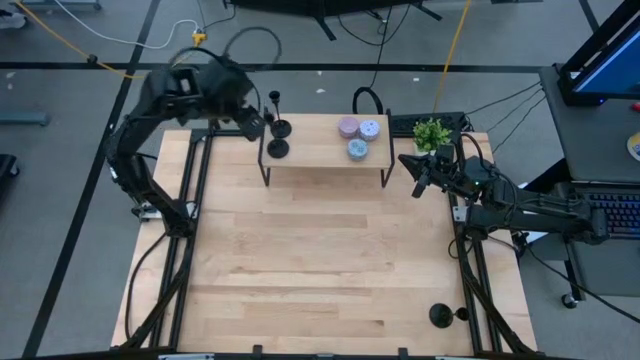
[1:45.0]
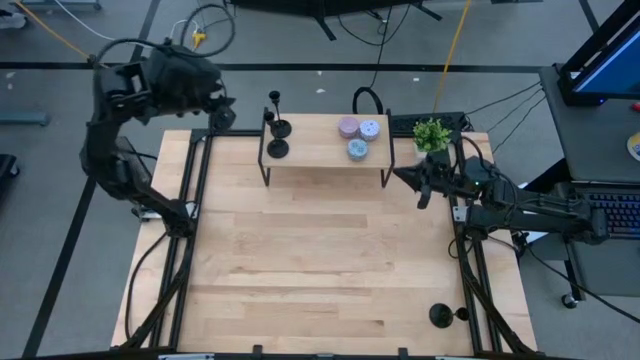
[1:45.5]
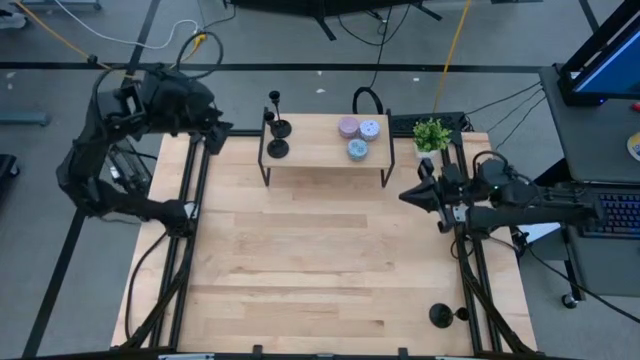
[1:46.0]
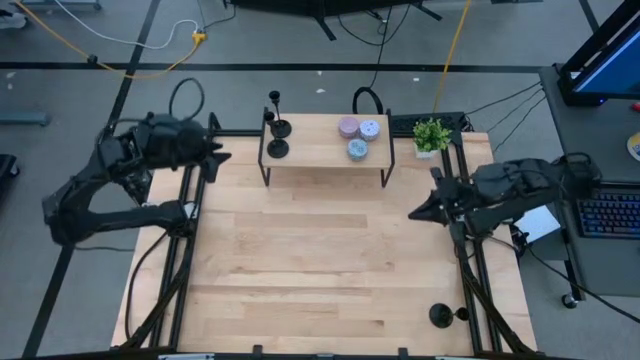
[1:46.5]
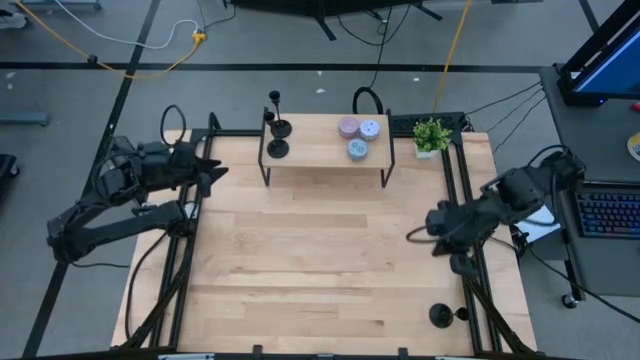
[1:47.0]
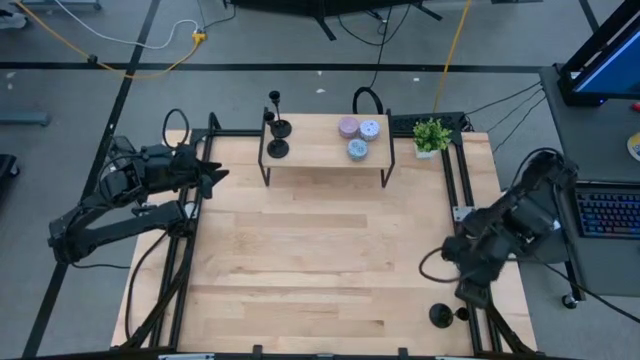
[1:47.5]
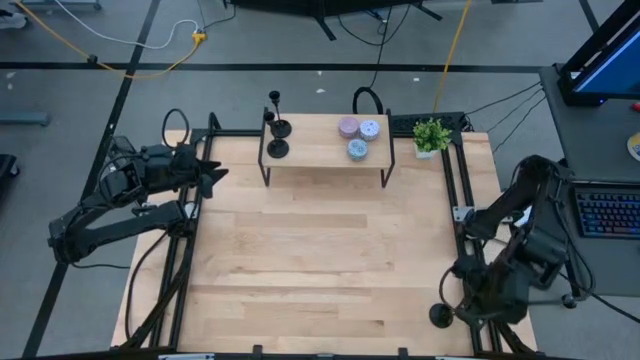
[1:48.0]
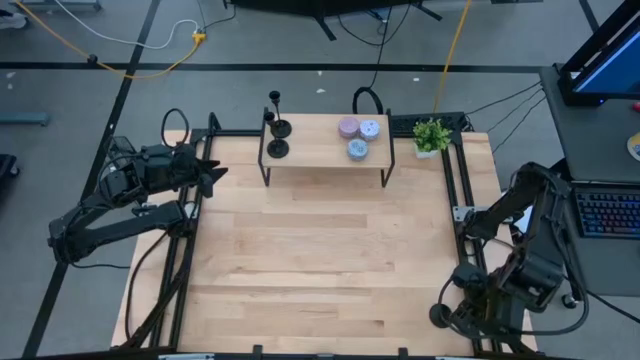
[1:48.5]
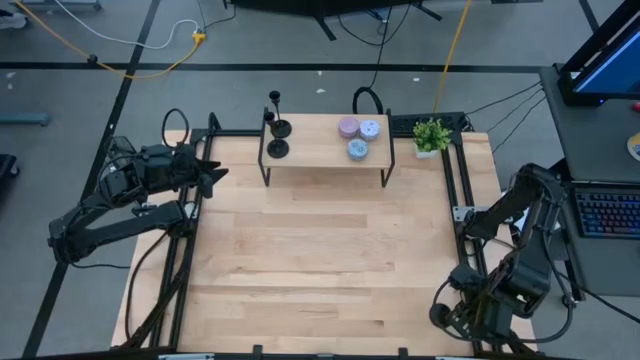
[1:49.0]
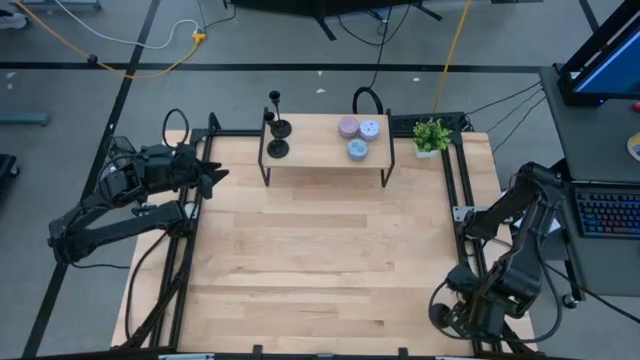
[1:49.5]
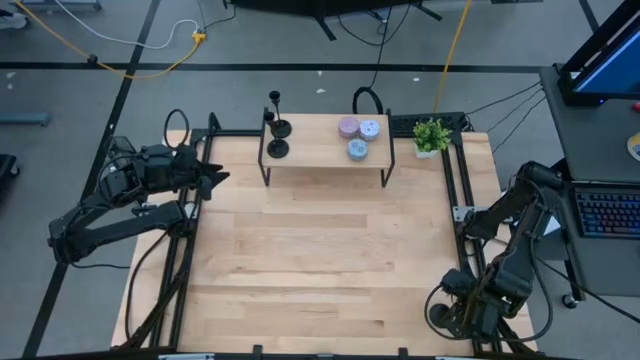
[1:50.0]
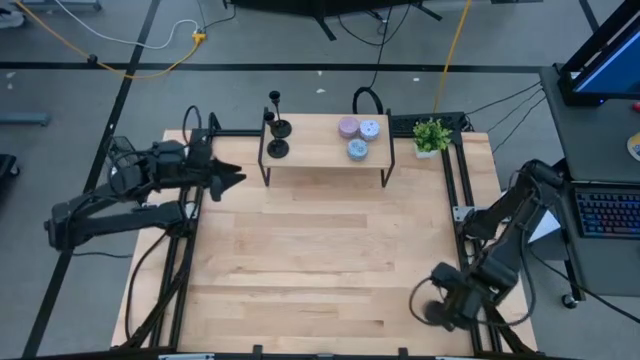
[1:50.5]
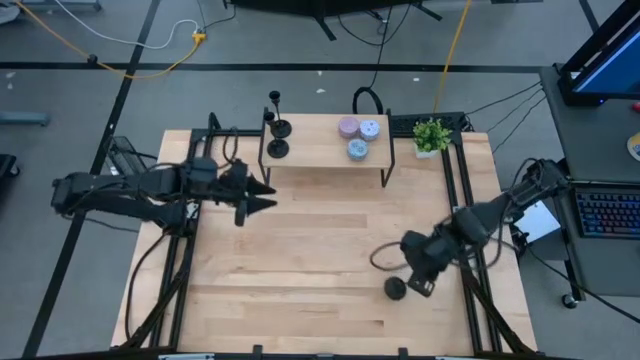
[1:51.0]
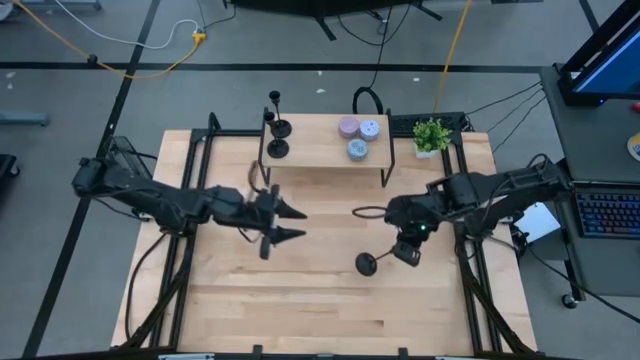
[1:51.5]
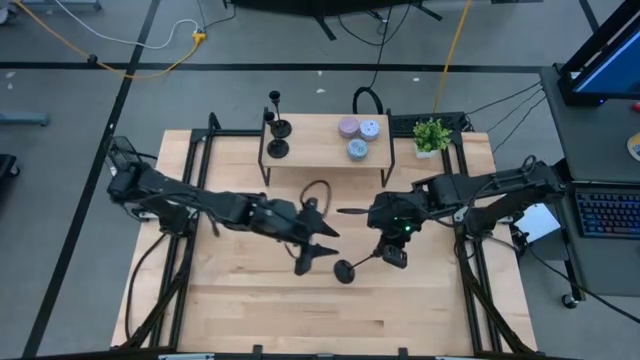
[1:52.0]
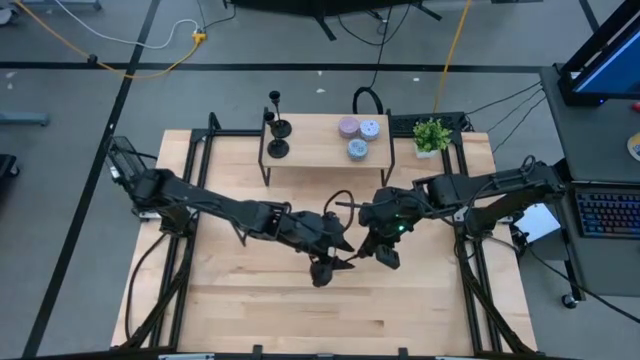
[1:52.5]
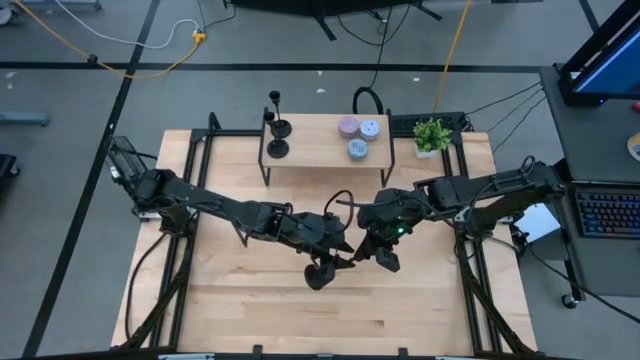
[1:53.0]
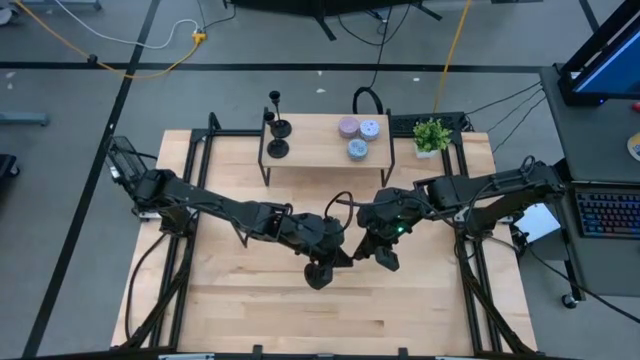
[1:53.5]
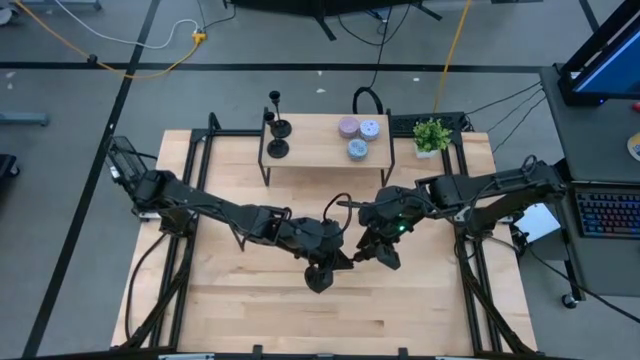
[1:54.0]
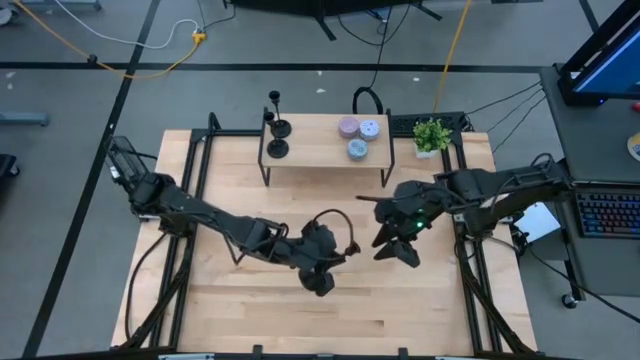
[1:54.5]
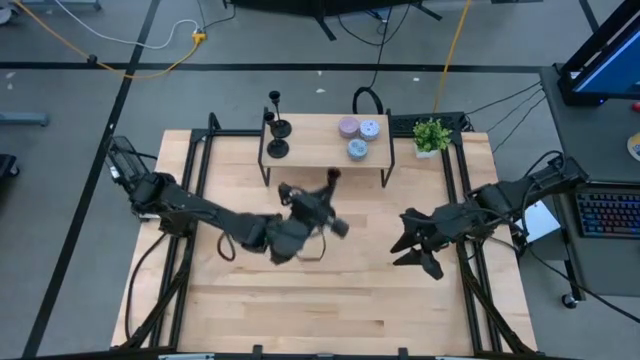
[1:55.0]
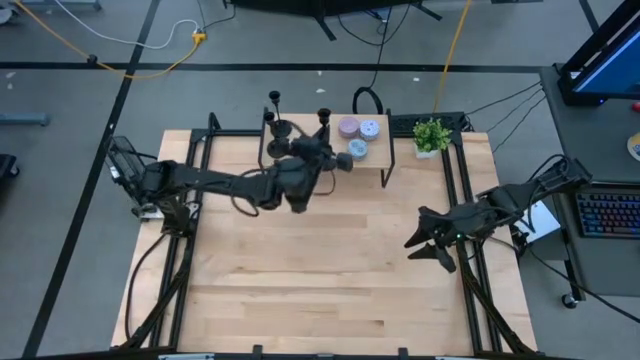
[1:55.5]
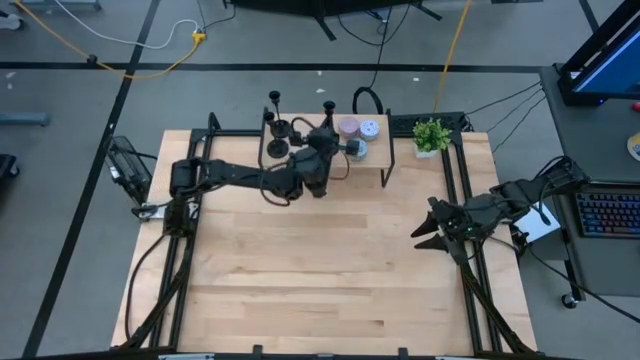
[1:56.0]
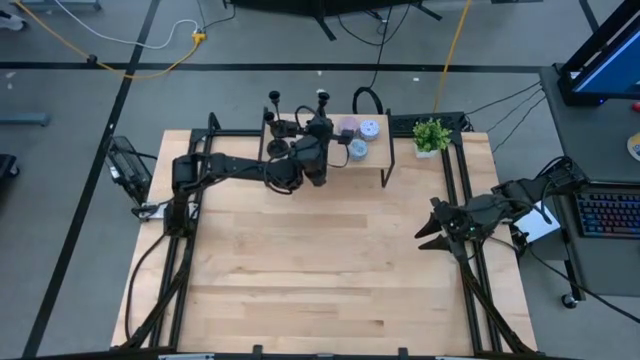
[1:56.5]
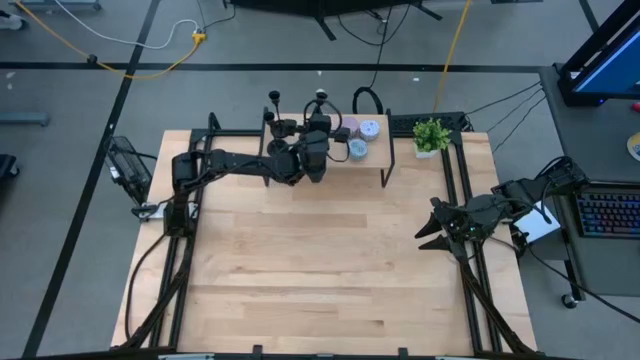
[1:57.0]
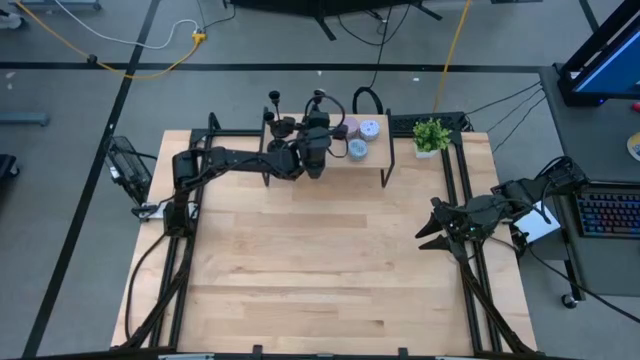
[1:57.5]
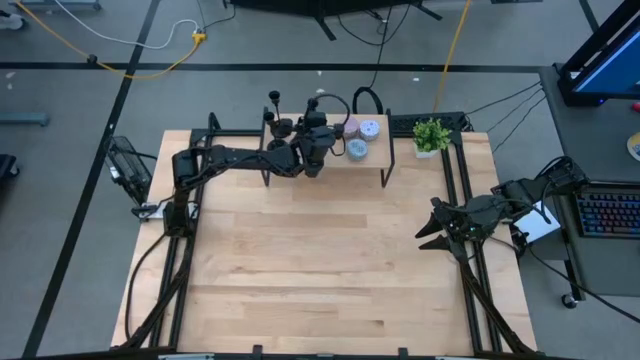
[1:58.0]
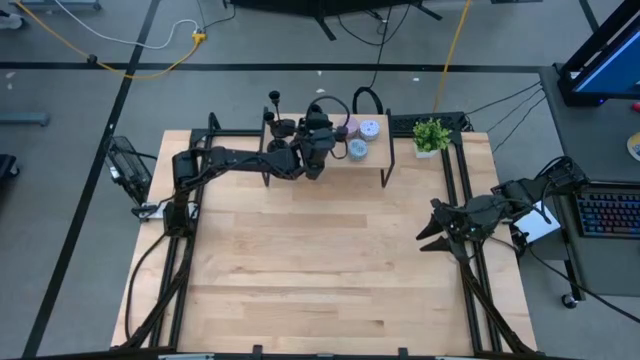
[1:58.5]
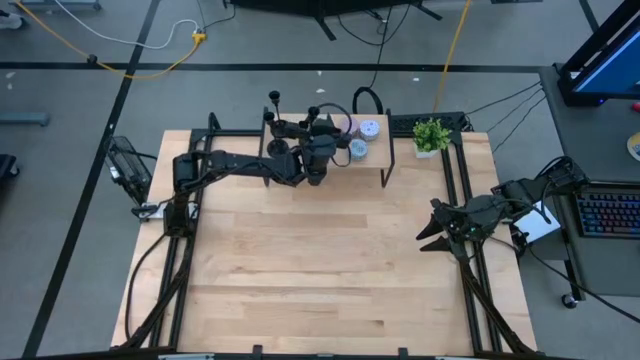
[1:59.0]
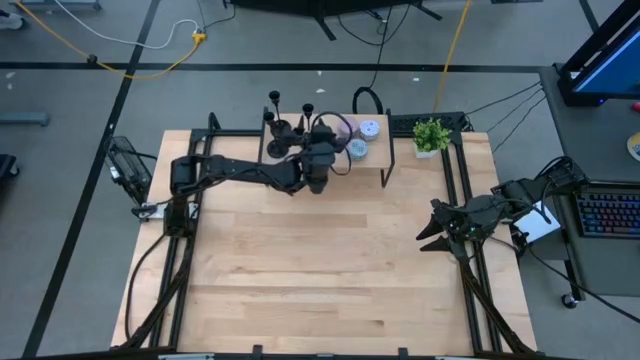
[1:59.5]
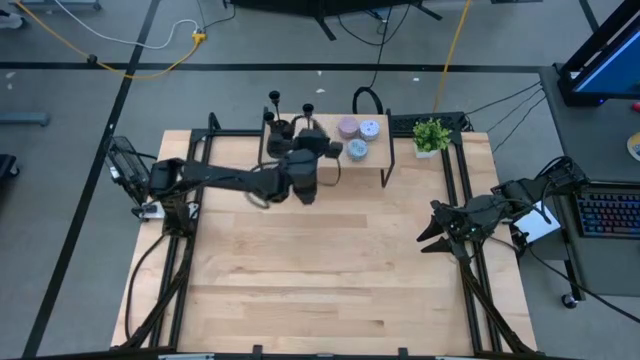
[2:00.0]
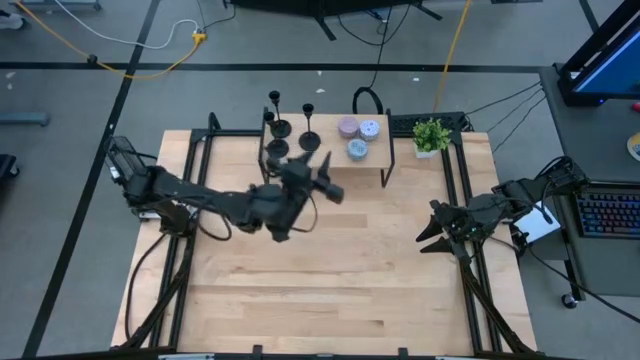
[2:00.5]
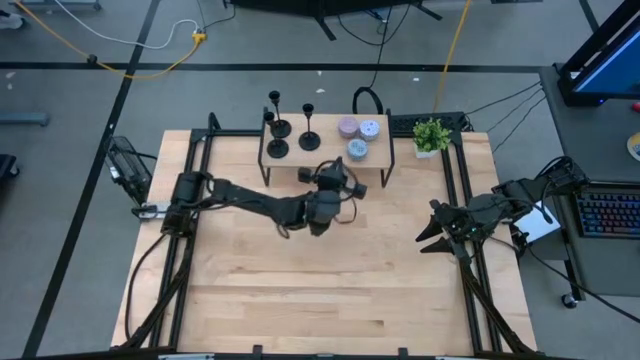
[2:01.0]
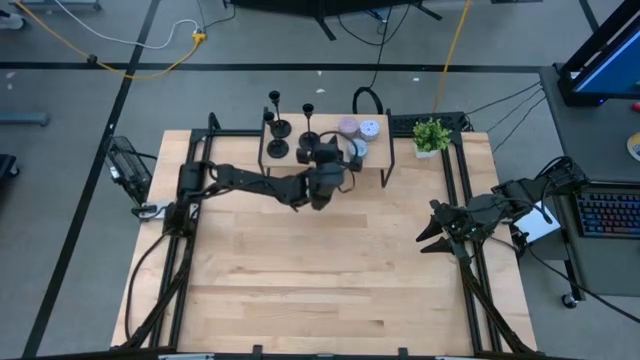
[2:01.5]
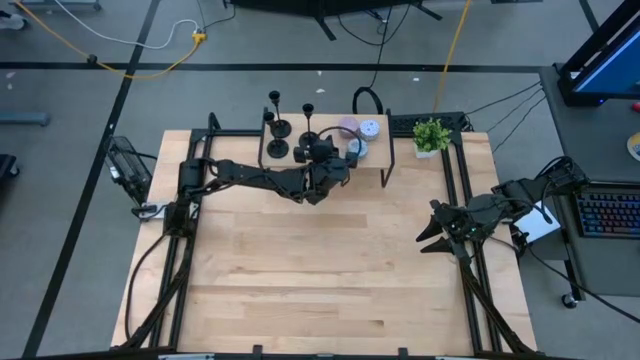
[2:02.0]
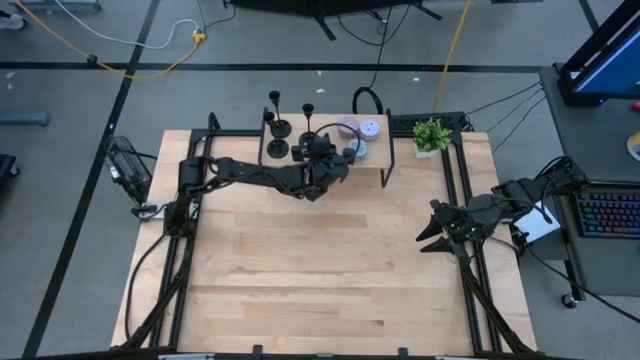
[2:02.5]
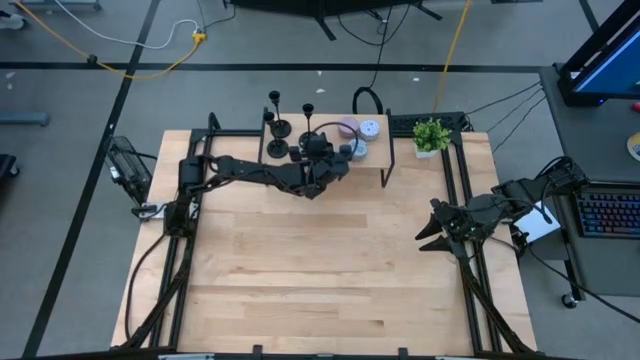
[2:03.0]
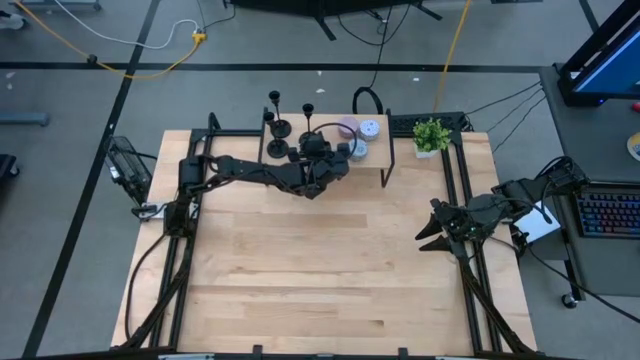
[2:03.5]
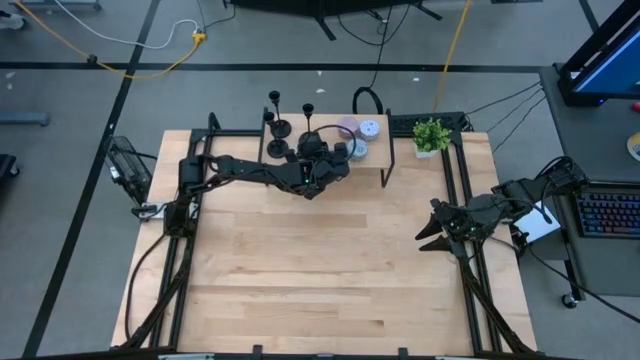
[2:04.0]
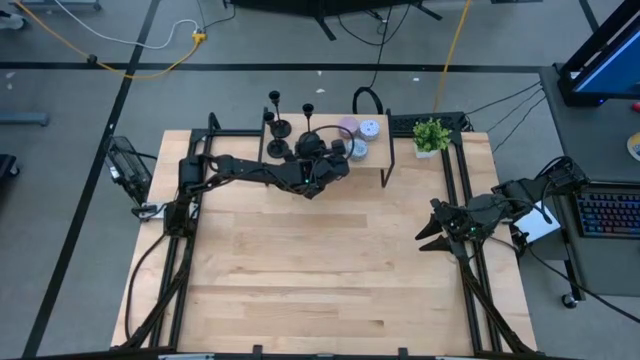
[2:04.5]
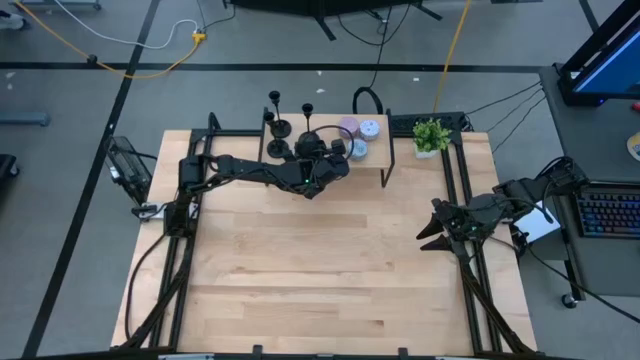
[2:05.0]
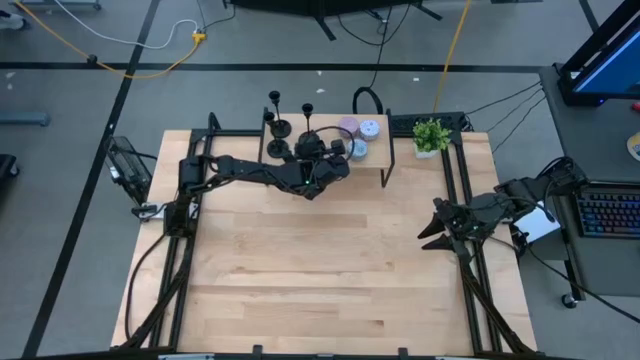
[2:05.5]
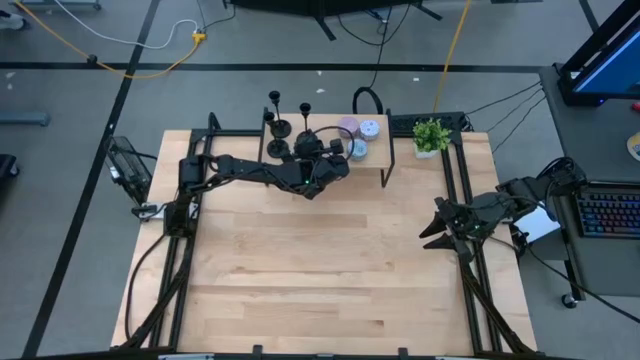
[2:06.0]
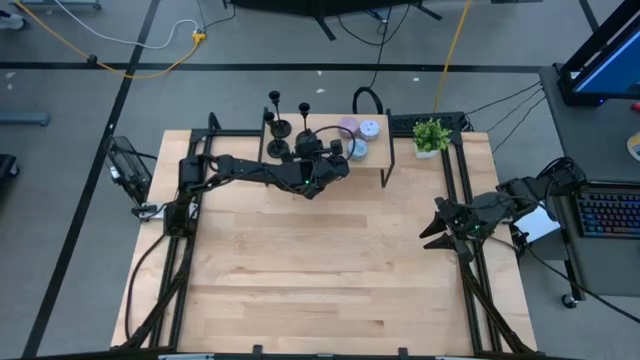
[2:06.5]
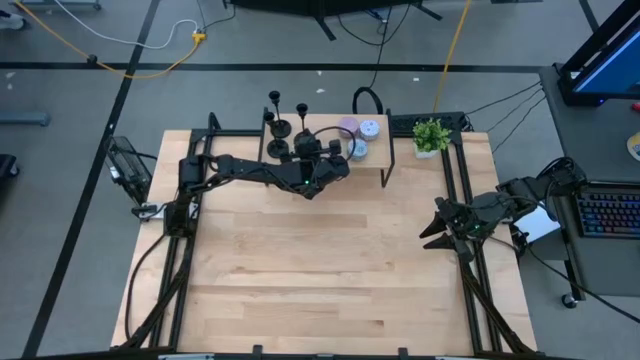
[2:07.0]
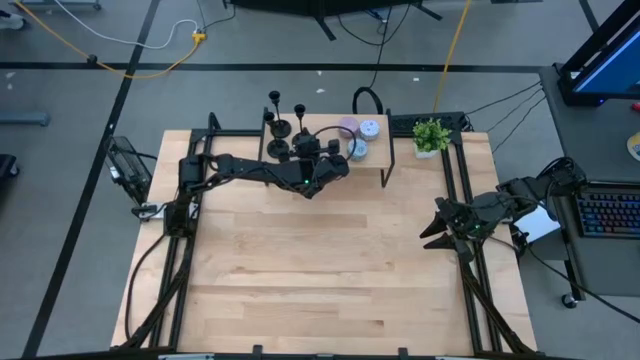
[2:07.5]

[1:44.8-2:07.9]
Task: Pick & Place candle stick holders
Put the black candle holder on the shelf
